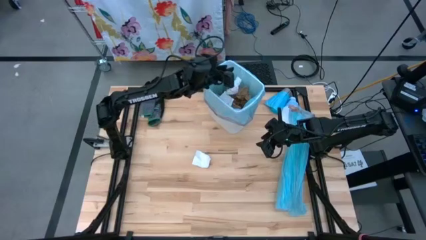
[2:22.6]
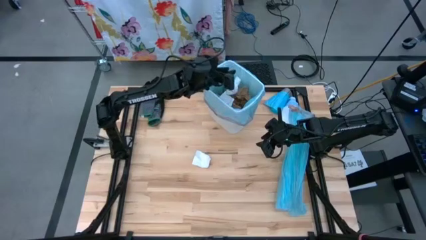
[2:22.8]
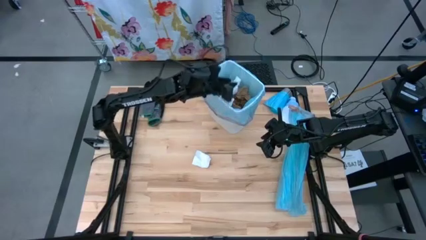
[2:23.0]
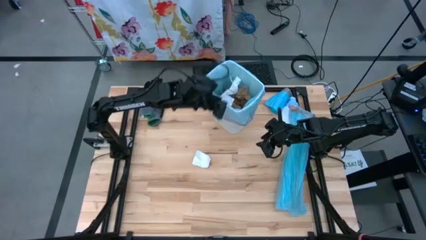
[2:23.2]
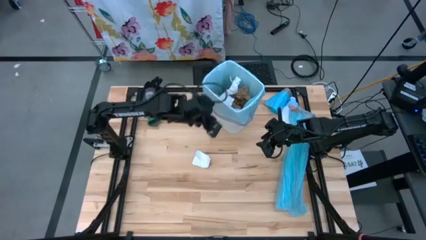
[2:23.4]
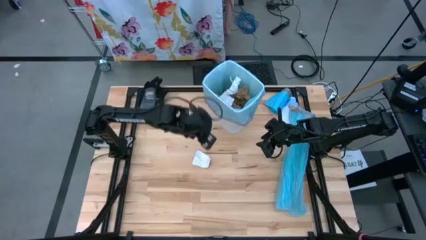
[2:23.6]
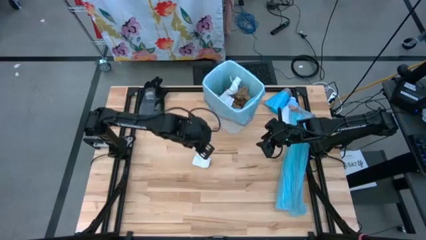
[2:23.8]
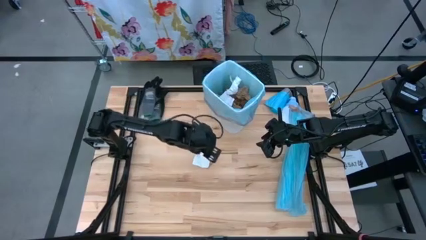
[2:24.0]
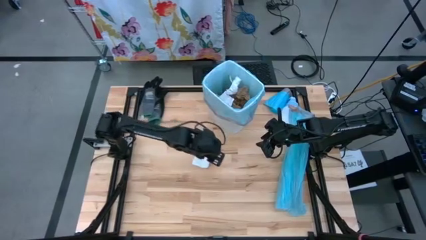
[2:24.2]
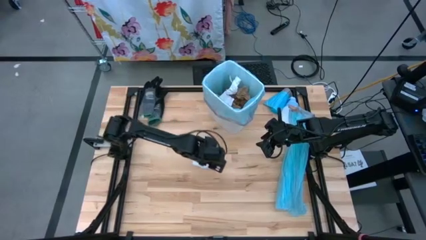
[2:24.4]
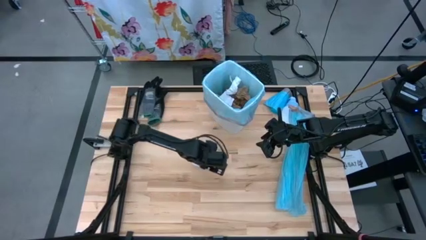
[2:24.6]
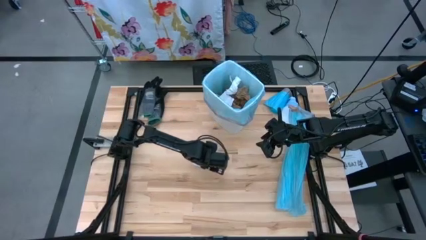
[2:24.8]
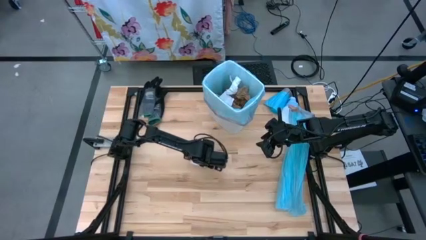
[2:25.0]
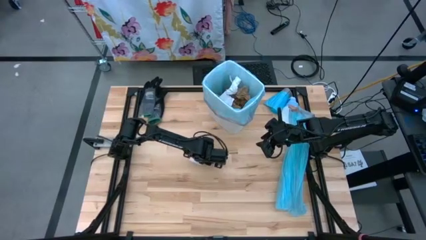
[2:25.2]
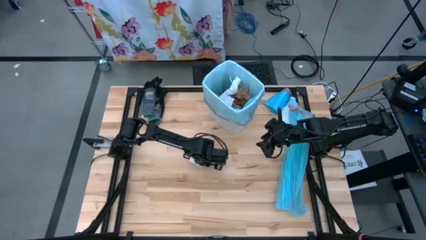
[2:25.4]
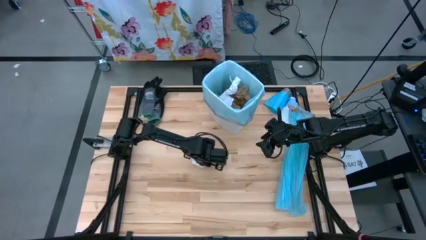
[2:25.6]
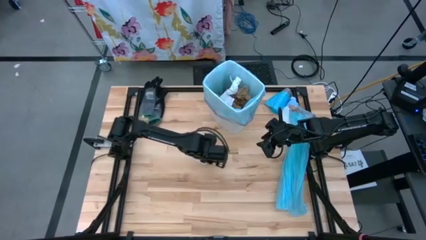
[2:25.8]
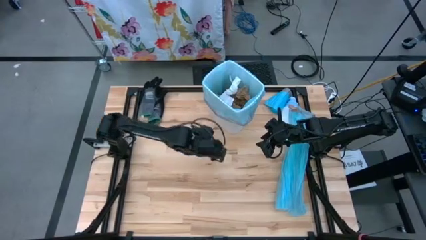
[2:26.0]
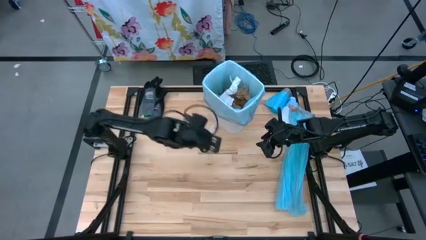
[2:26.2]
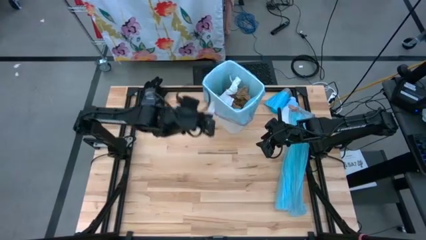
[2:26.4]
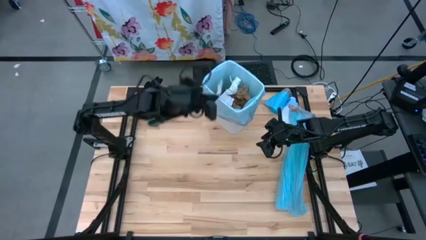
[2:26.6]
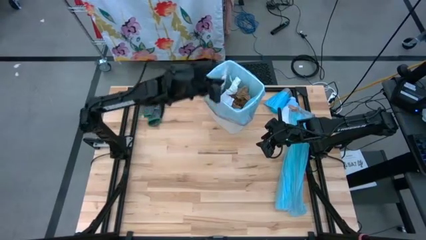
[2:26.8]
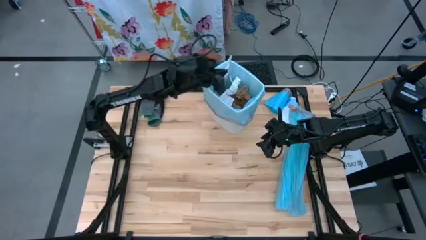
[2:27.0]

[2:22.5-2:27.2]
Task: place trash/remove bag and relplace
Put the white paper into the trash bin

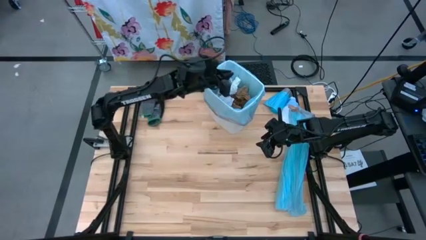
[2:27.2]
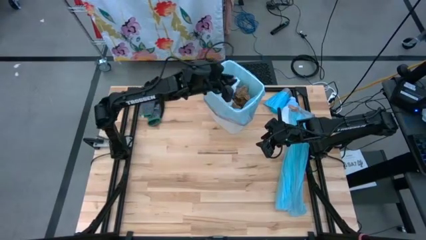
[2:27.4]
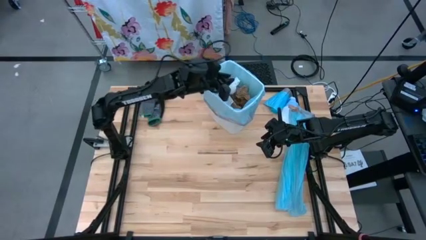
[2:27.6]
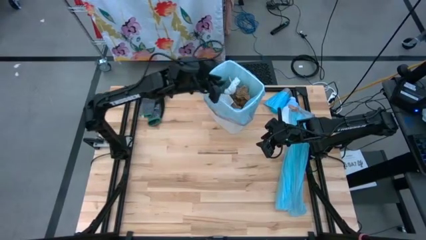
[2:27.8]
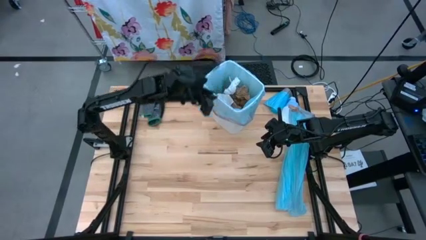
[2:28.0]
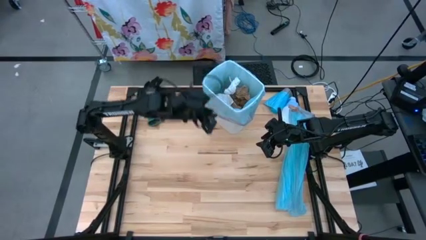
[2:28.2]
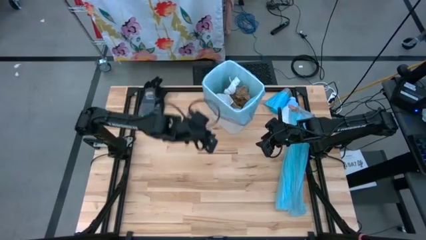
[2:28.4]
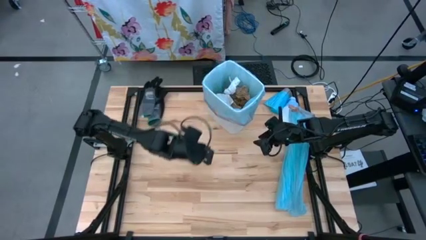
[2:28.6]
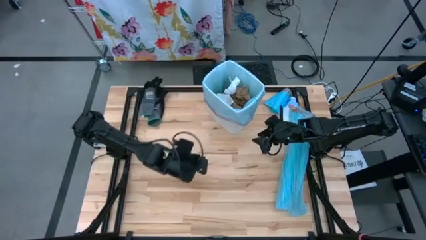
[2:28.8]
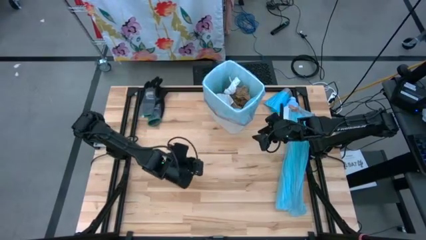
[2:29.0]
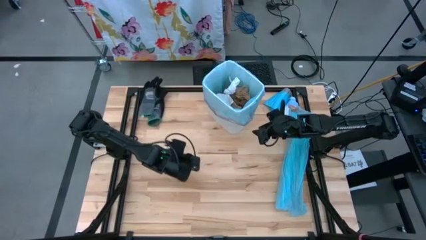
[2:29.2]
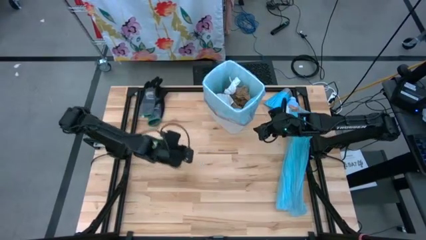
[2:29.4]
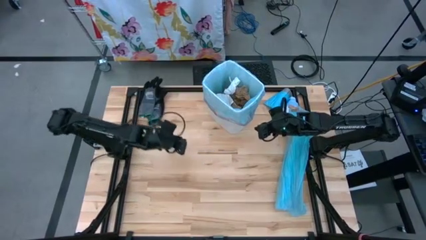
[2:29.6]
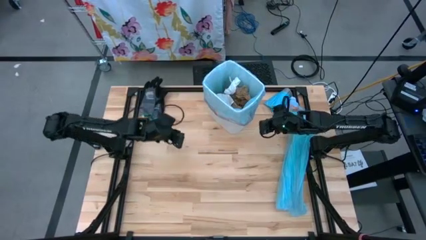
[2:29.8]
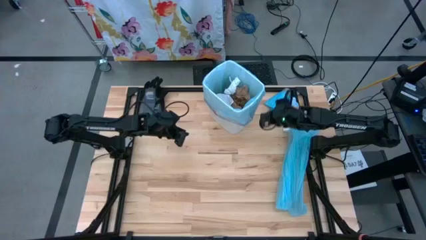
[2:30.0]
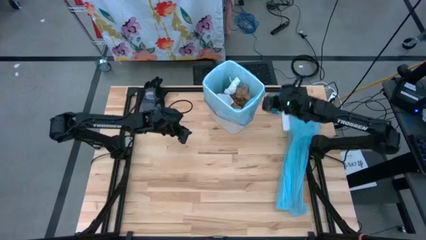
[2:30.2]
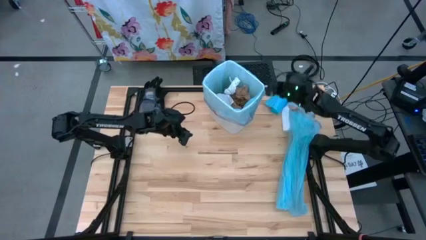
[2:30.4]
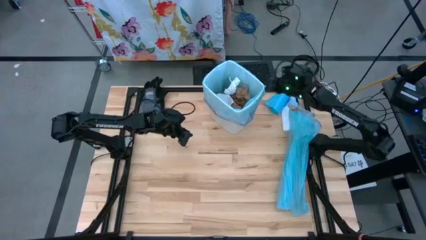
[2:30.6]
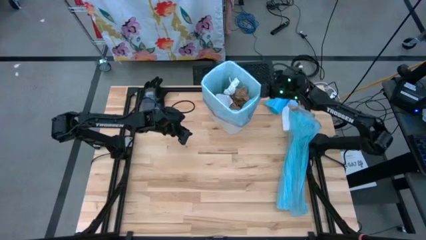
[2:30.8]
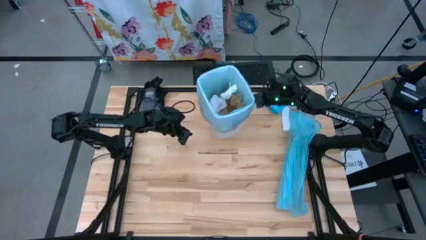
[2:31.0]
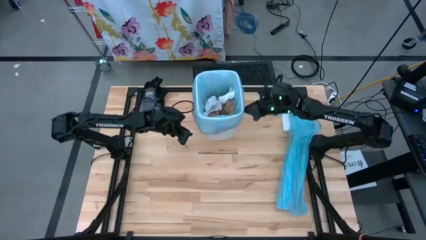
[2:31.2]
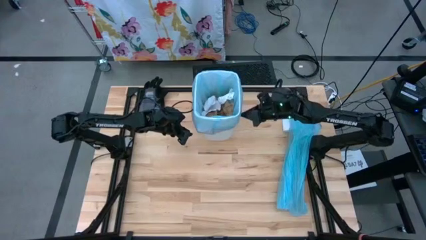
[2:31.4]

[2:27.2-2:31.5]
Move the trash bin to the top of the table

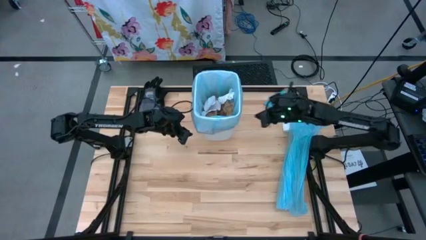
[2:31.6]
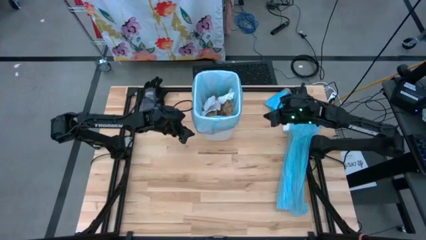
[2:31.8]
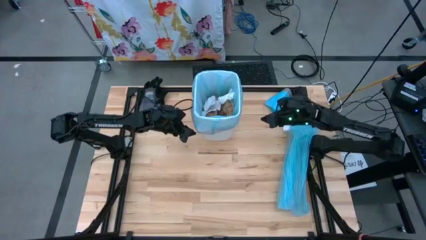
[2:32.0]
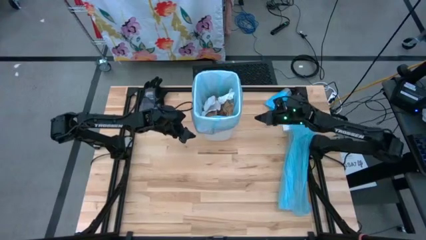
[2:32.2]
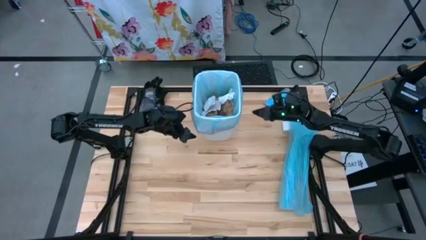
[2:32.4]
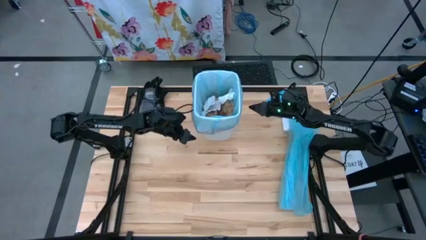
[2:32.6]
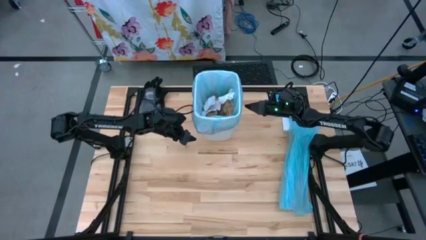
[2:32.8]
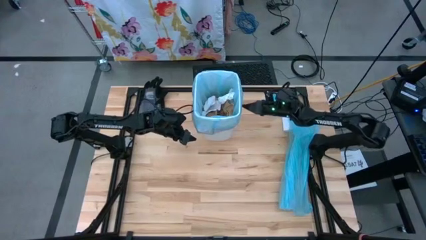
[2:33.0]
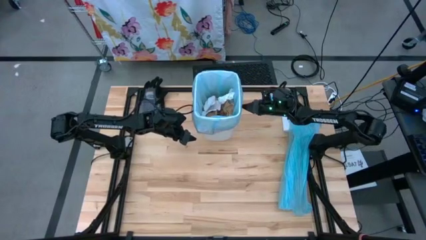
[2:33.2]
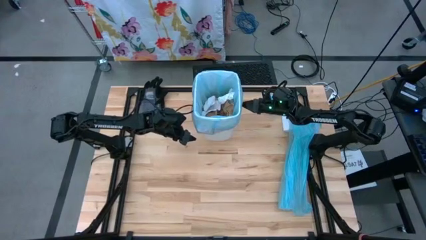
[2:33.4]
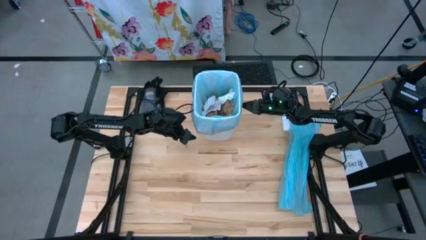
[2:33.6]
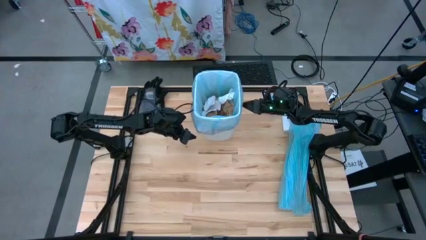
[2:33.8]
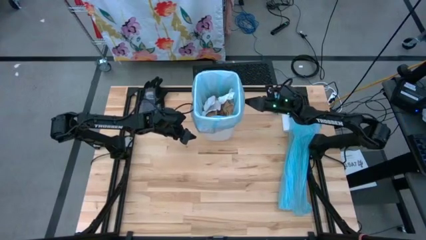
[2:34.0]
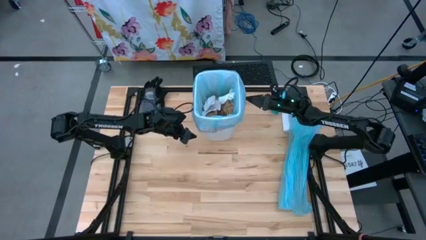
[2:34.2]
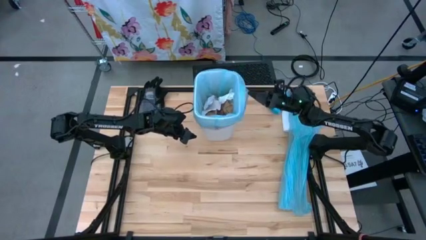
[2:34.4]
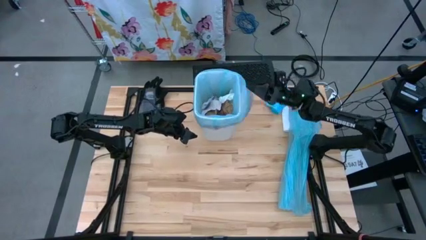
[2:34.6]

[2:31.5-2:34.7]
Close the trash bag

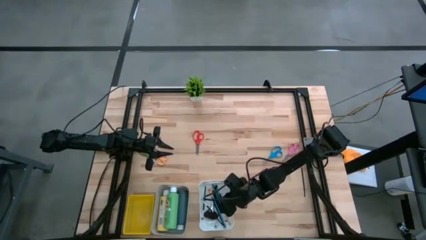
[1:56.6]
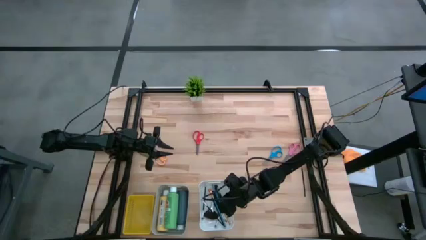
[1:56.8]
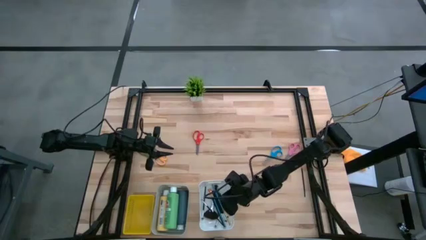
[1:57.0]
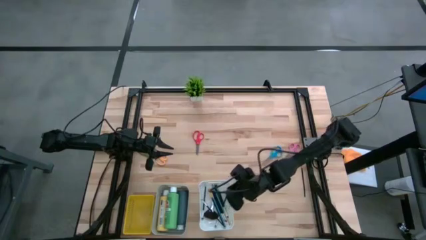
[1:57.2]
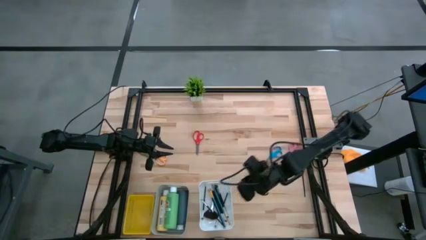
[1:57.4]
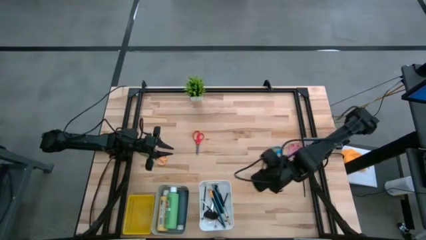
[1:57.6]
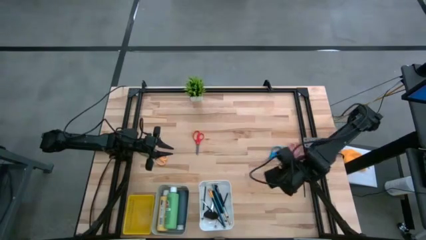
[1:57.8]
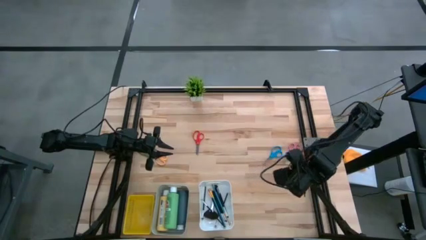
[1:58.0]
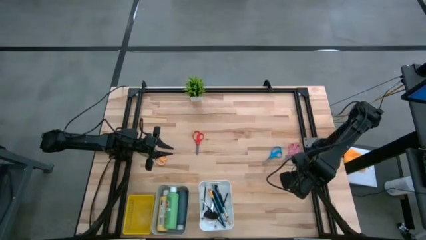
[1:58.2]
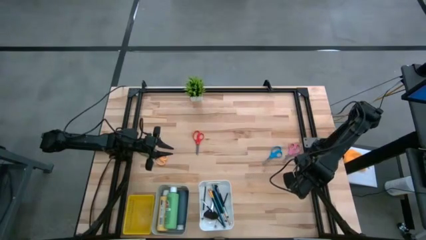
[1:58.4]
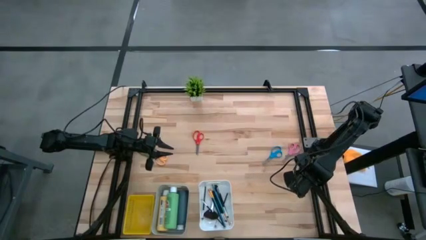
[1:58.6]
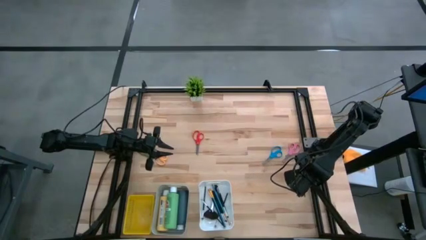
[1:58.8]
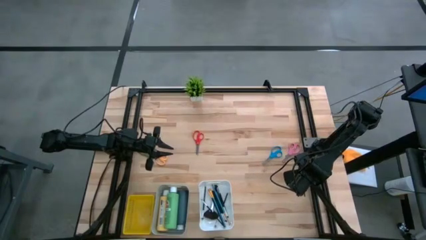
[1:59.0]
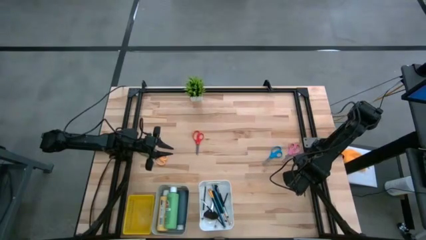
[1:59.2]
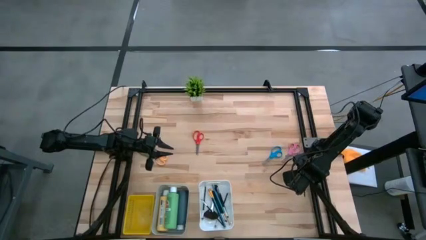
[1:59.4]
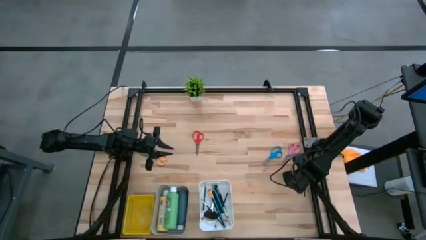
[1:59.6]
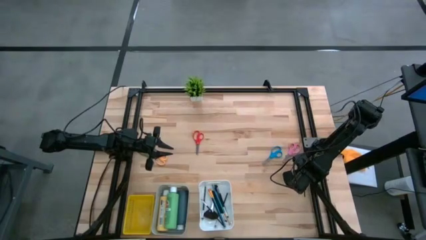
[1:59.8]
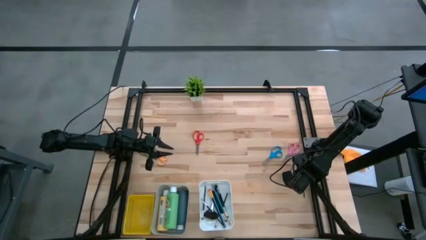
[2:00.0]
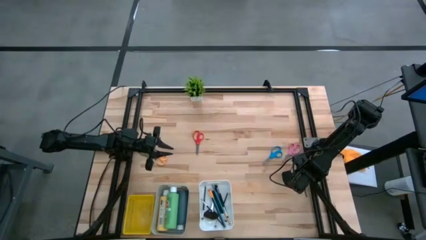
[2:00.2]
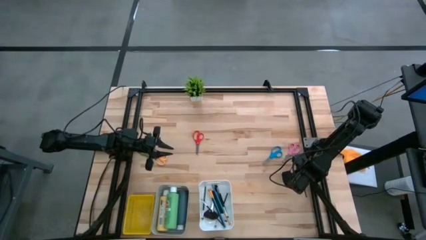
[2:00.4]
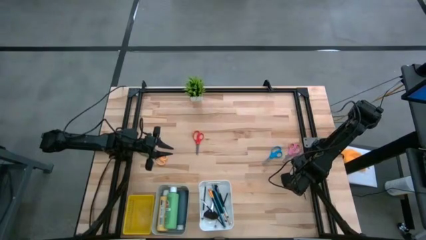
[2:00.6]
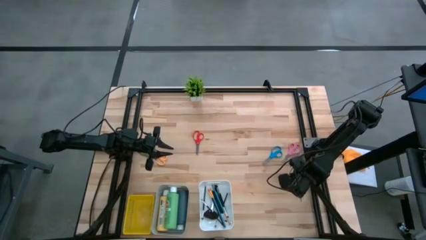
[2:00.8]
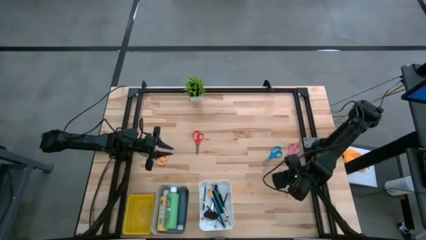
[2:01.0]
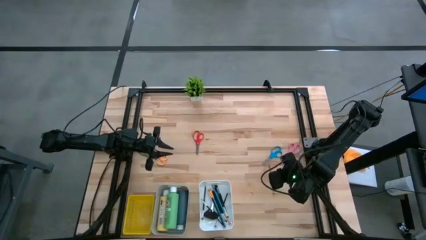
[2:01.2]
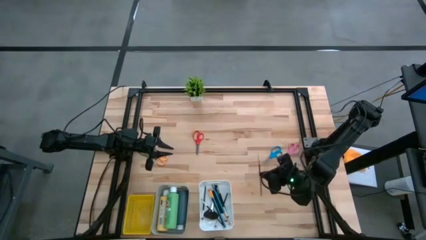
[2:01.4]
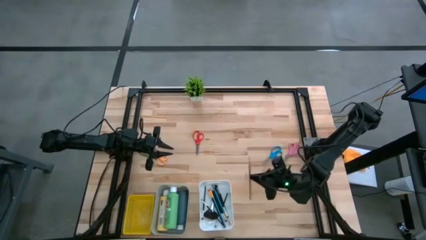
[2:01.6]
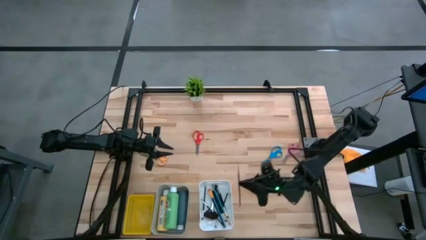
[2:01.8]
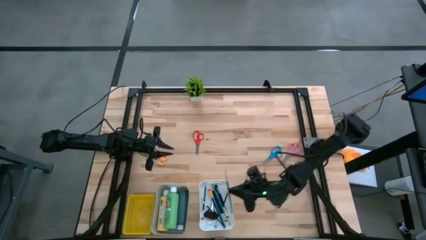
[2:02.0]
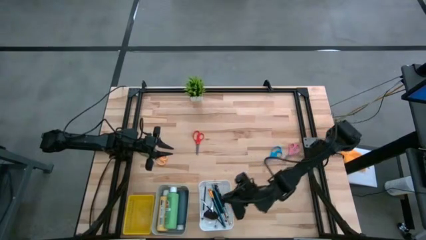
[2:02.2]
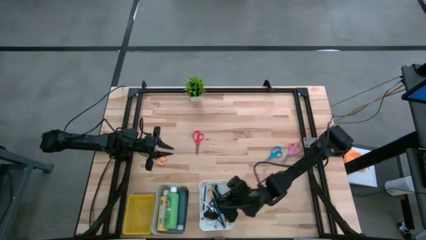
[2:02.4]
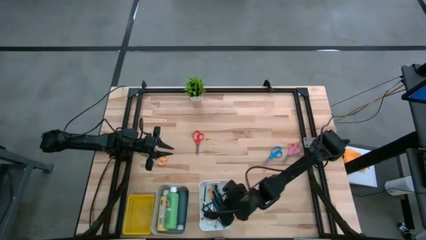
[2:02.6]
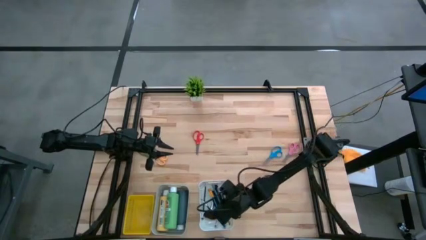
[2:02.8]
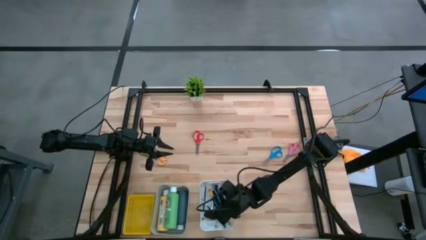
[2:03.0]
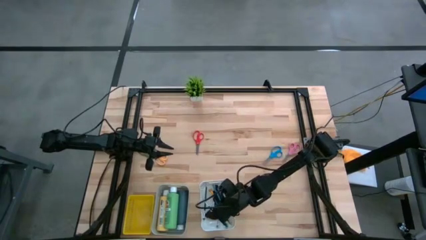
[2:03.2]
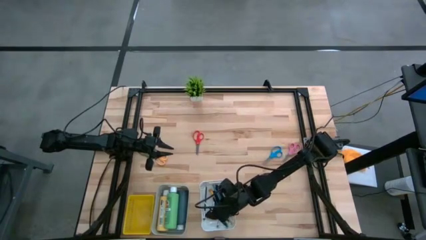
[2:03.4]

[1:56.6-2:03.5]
Task: Pick & Place Paint Supplies
Put the black paint brush into the white bin
